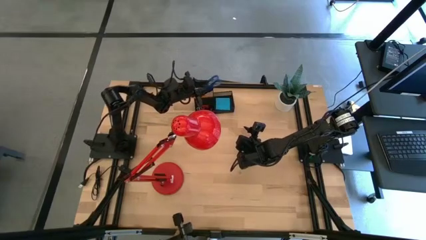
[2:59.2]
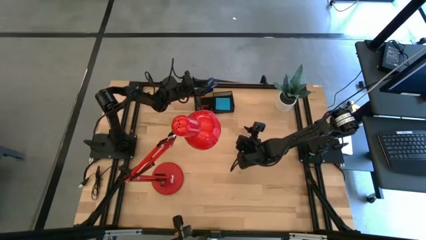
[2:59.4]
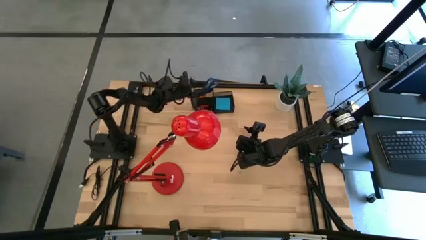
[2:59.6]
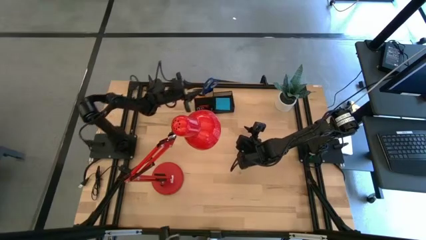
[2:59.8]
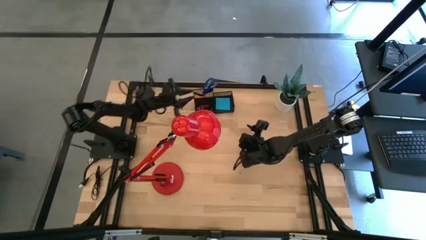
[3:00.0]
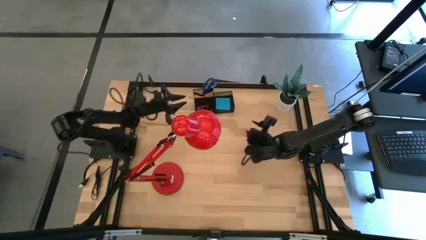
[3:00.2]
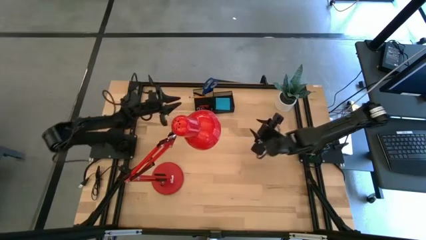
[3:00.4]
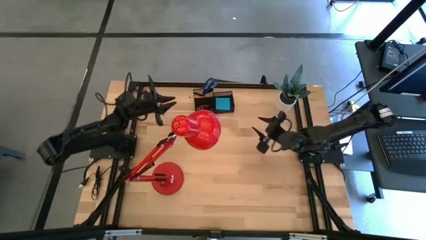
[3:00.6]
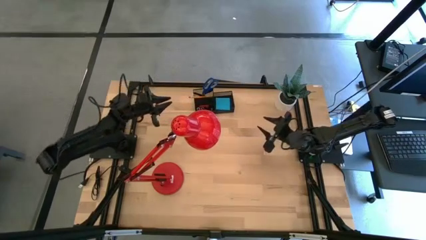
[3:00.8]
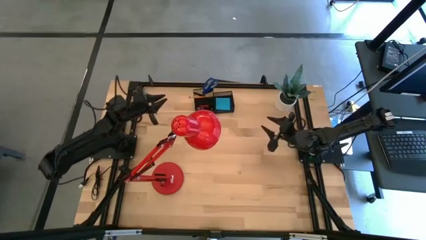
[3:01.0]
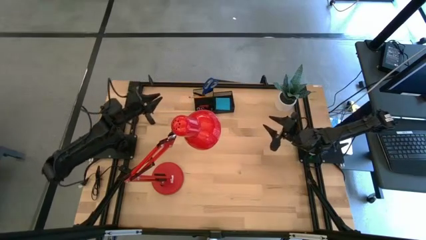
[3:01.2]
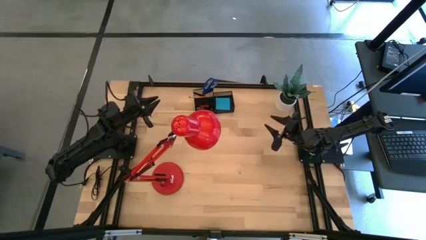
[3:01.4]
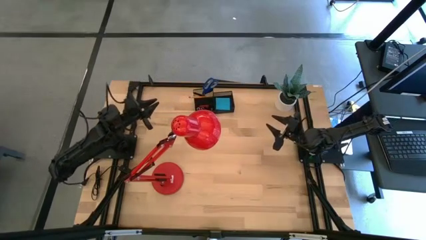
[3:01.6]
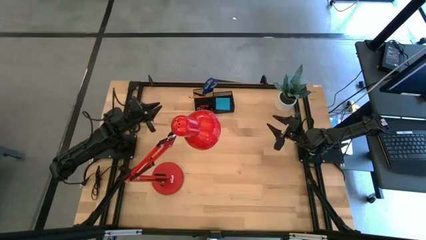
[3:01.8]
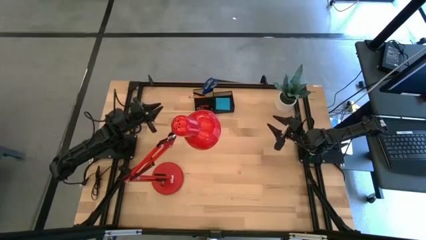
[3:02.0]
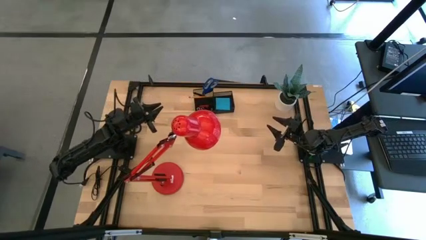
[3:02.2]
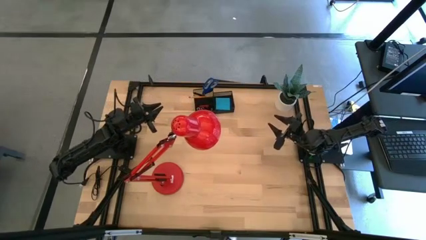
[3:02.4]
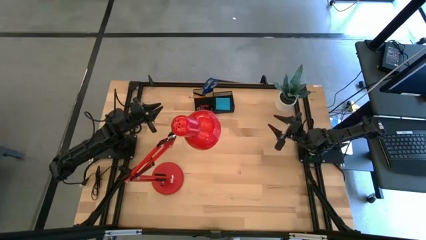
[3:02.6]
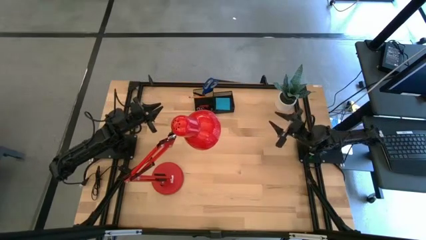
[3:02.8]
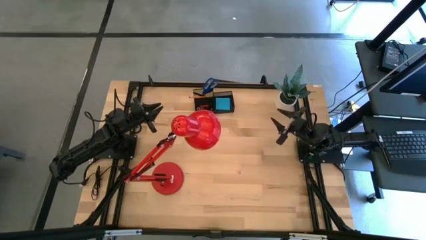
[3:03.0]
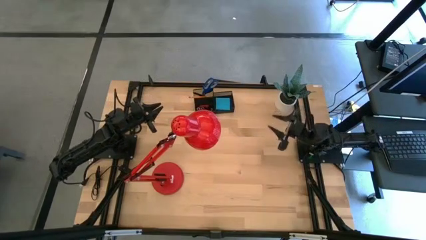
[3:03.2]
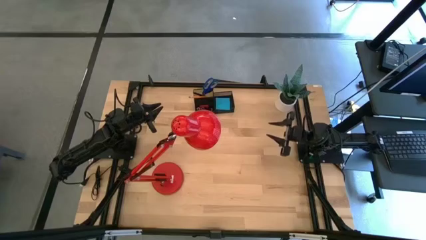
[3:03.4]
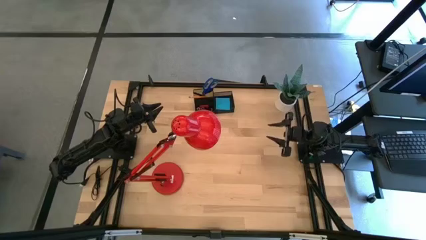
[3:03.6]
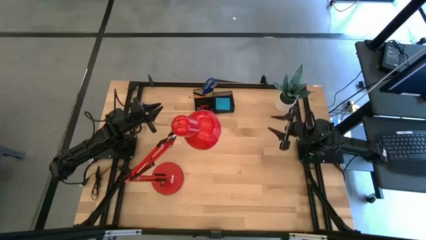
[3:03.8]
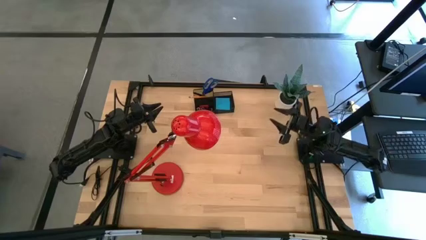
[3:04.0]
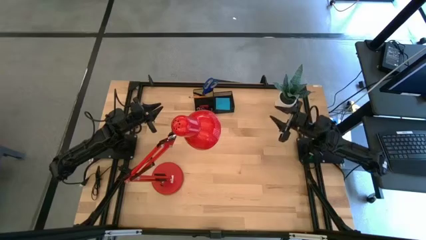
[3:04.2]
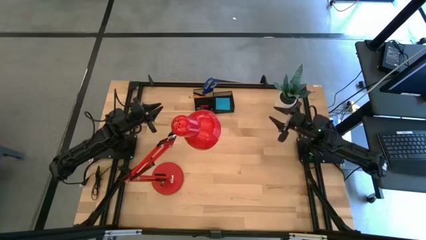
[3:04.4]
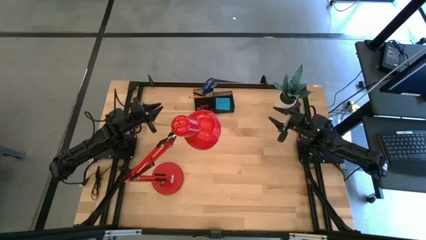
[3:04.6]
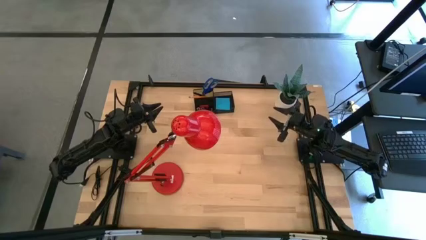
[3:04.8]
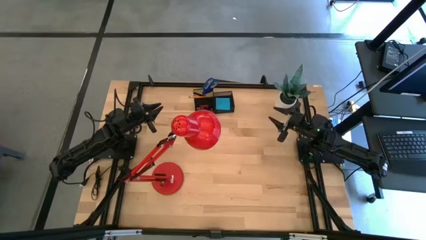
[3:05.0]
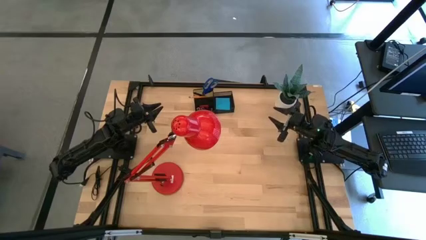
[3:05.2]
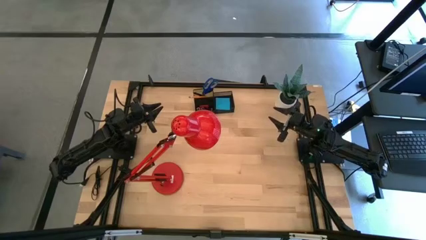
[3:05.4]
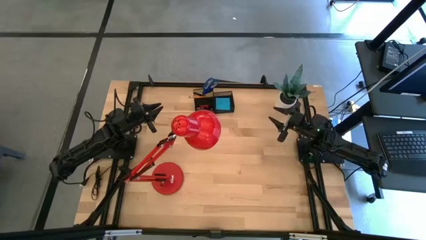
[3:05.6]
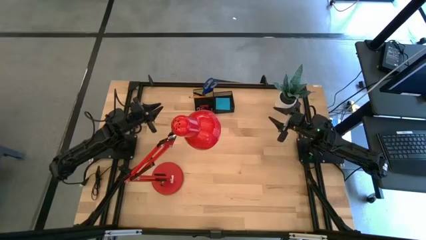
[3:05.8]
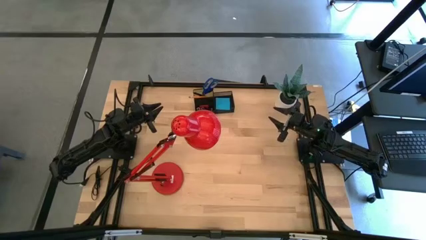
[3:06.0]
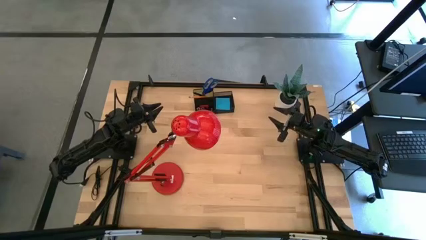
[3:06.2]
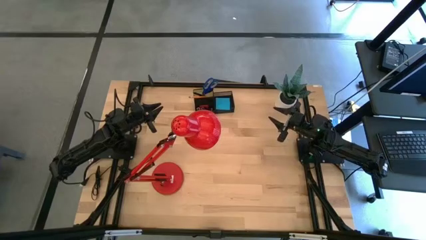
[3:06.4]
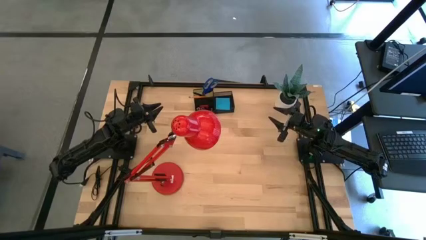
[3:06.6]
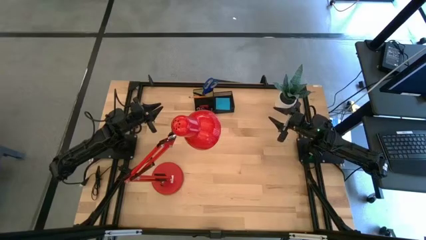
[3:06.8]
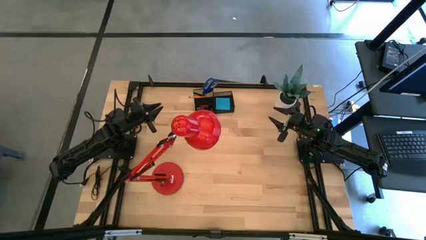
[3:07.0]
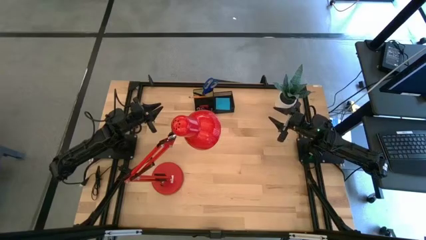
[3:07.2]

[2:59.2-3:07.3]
Task: Pick and place office supplies into organizer
Return to Home Position
